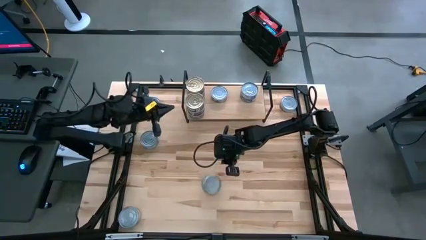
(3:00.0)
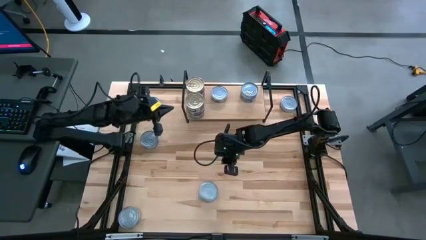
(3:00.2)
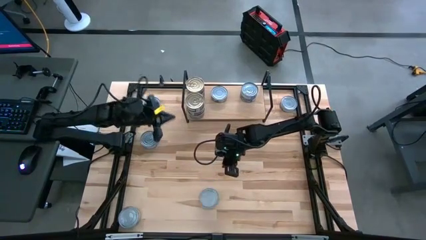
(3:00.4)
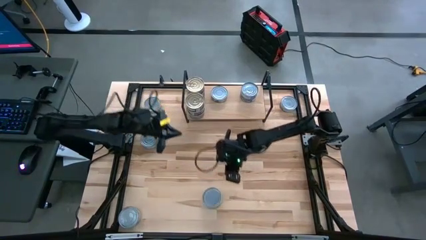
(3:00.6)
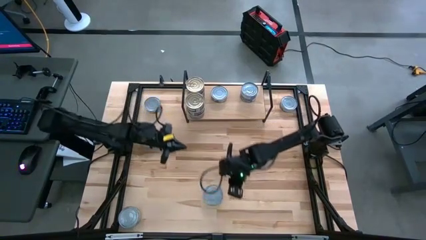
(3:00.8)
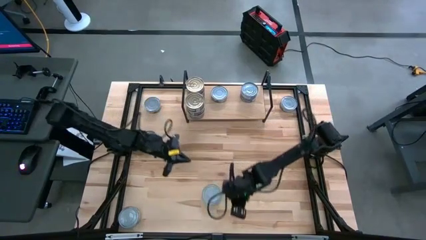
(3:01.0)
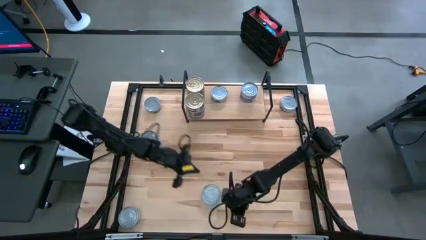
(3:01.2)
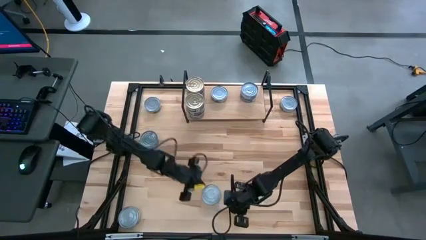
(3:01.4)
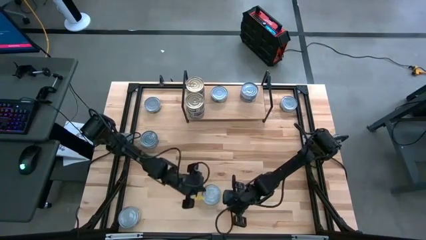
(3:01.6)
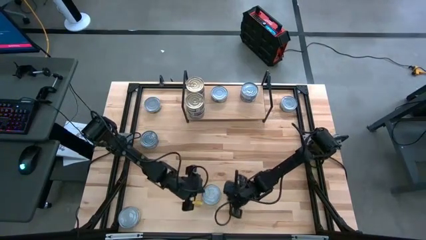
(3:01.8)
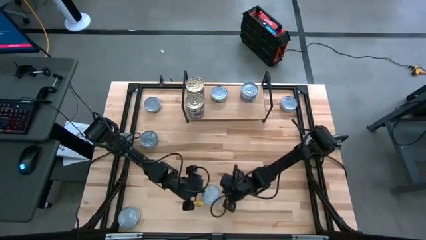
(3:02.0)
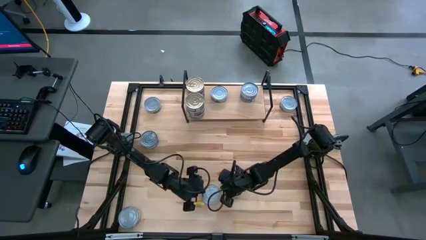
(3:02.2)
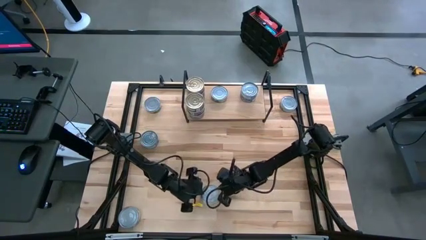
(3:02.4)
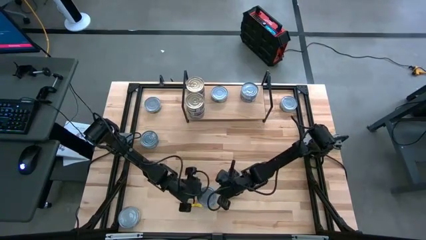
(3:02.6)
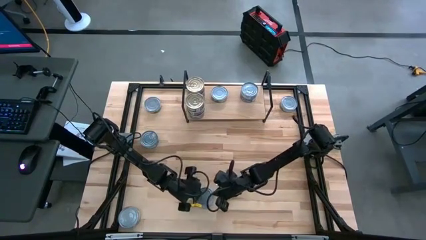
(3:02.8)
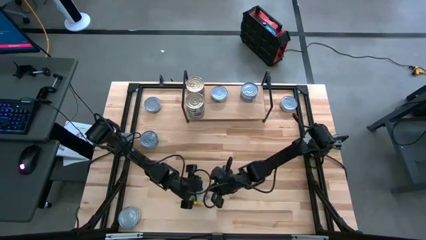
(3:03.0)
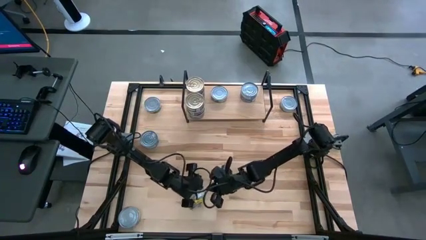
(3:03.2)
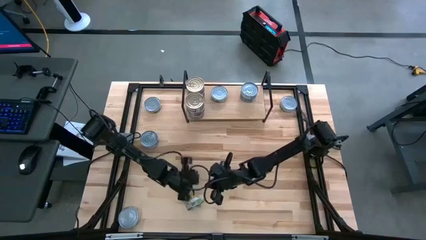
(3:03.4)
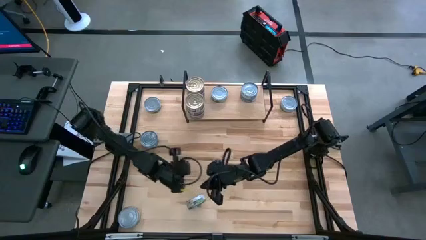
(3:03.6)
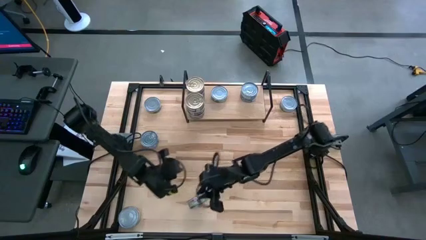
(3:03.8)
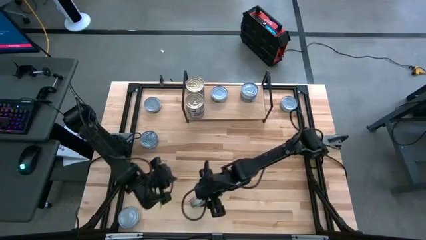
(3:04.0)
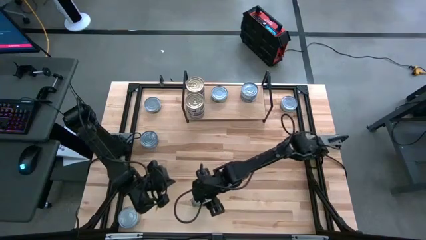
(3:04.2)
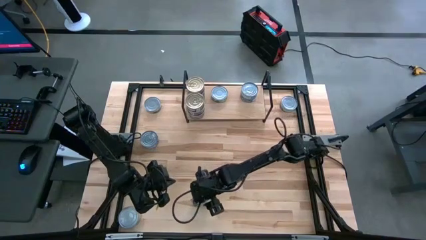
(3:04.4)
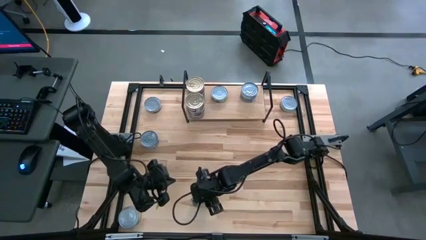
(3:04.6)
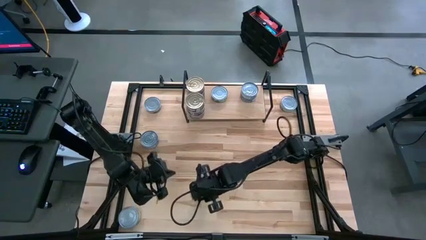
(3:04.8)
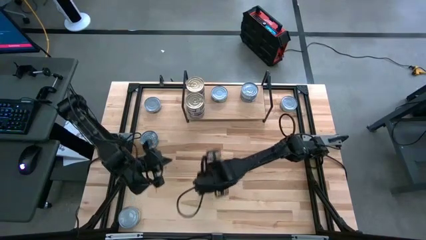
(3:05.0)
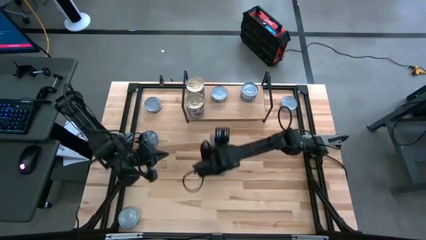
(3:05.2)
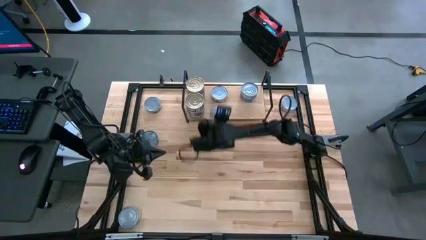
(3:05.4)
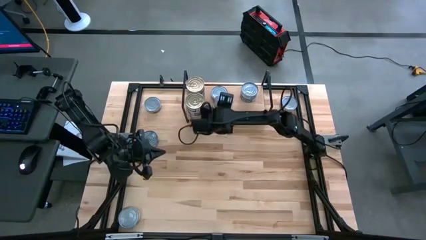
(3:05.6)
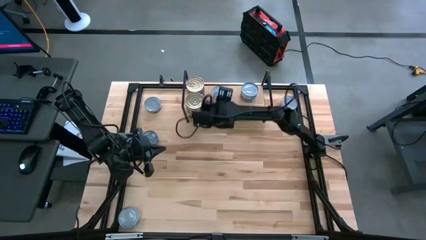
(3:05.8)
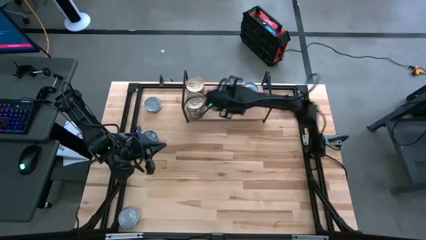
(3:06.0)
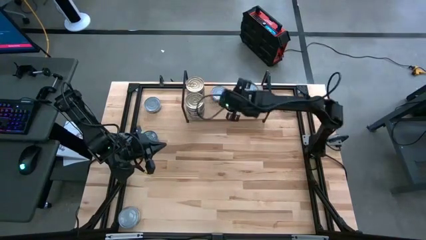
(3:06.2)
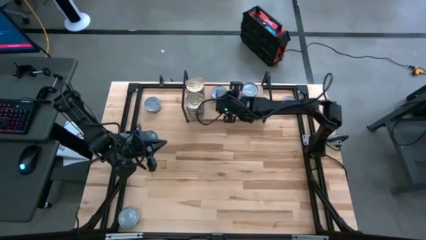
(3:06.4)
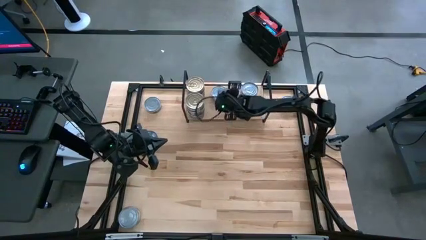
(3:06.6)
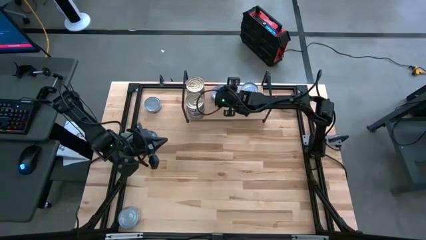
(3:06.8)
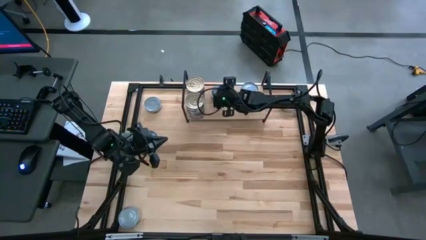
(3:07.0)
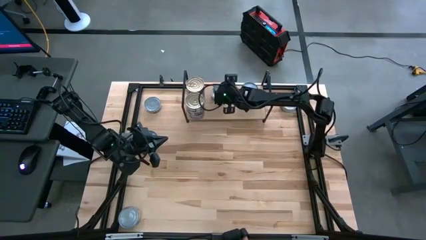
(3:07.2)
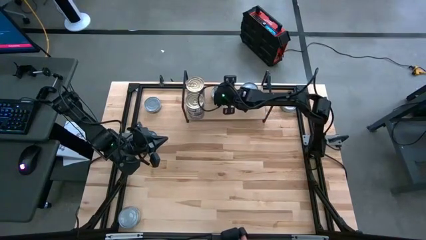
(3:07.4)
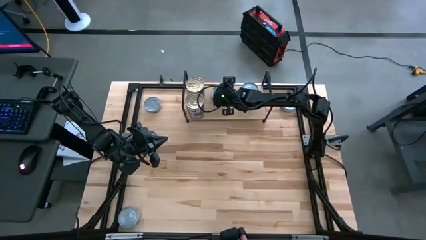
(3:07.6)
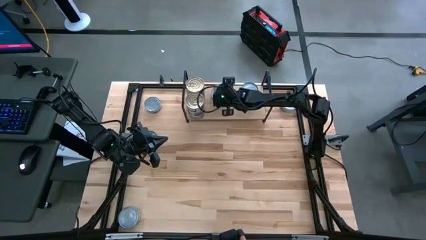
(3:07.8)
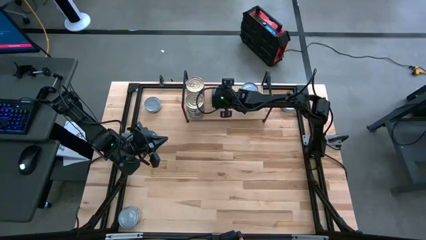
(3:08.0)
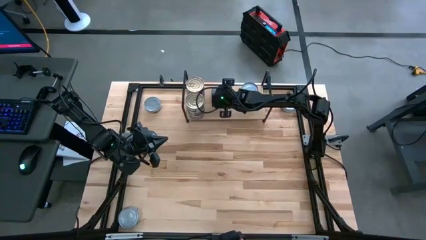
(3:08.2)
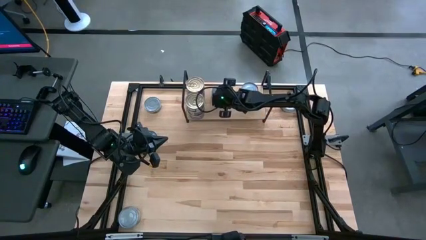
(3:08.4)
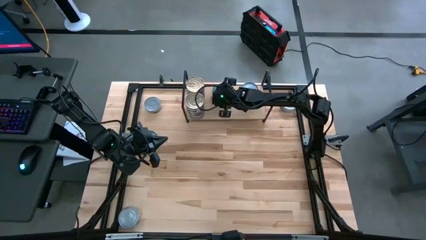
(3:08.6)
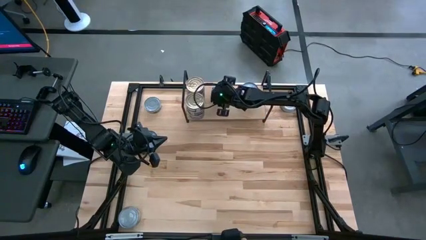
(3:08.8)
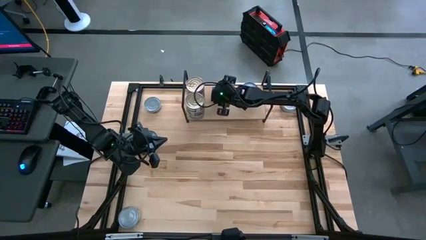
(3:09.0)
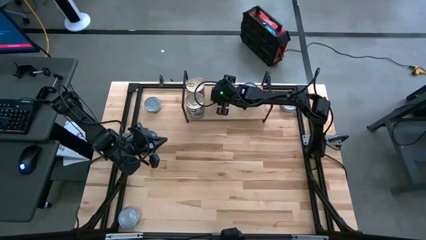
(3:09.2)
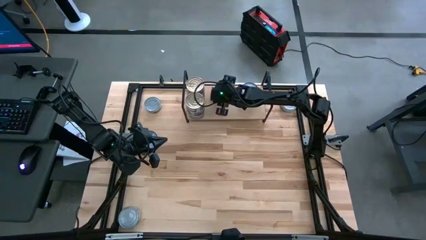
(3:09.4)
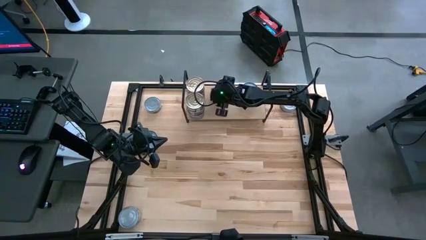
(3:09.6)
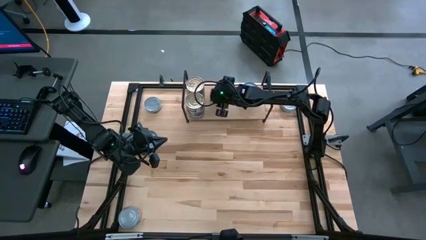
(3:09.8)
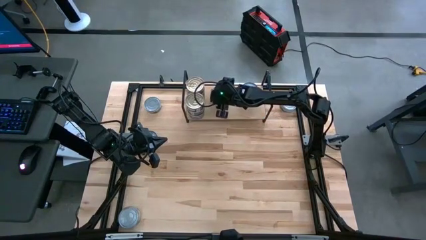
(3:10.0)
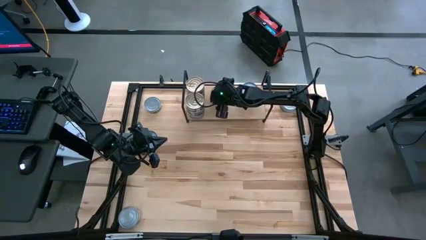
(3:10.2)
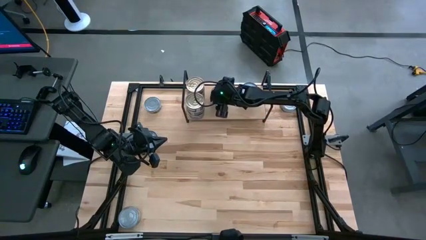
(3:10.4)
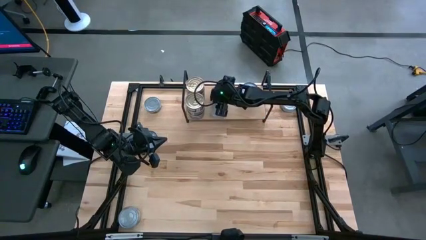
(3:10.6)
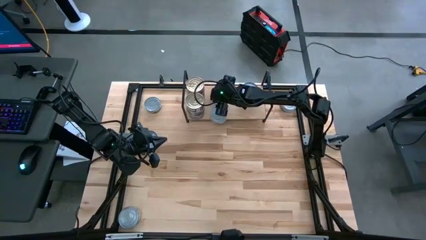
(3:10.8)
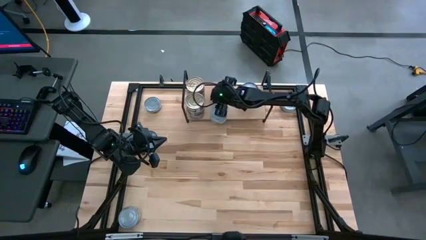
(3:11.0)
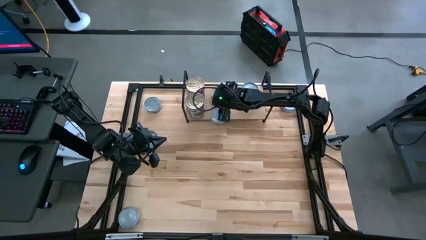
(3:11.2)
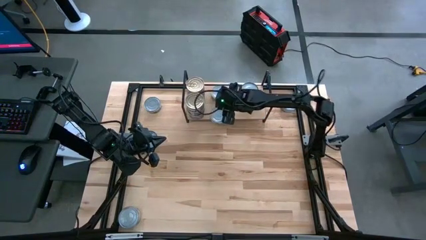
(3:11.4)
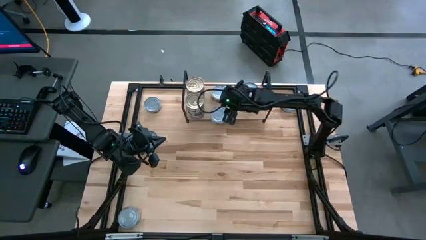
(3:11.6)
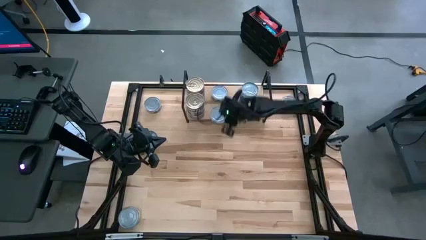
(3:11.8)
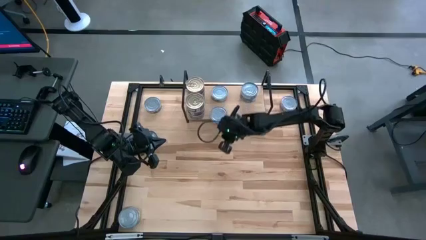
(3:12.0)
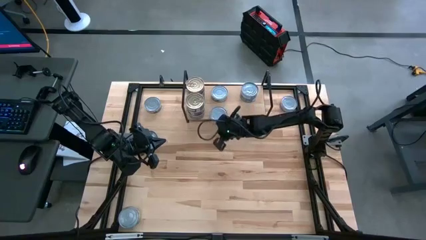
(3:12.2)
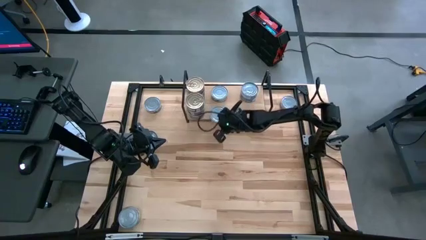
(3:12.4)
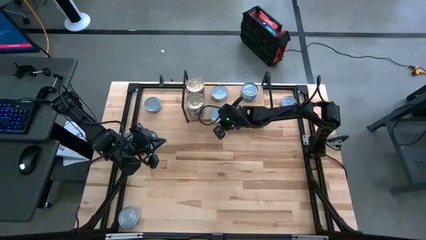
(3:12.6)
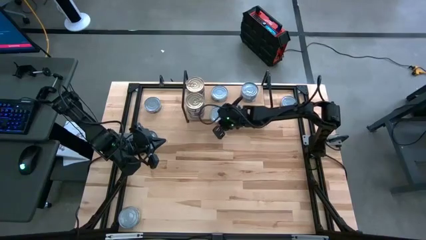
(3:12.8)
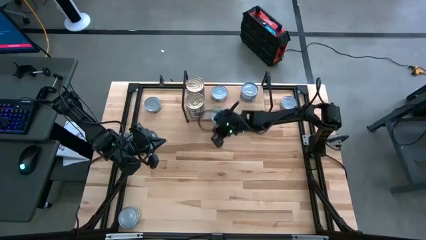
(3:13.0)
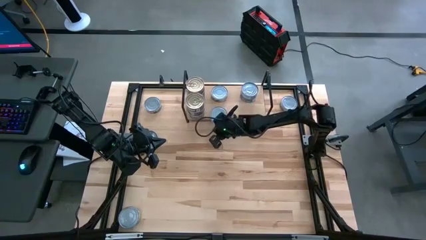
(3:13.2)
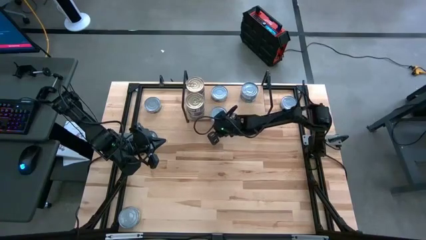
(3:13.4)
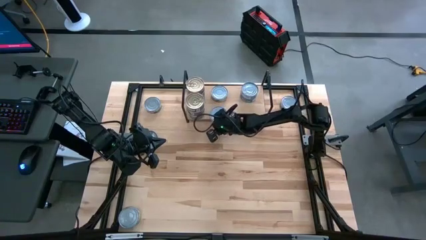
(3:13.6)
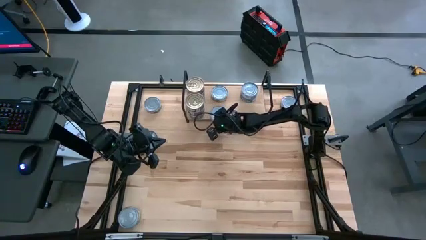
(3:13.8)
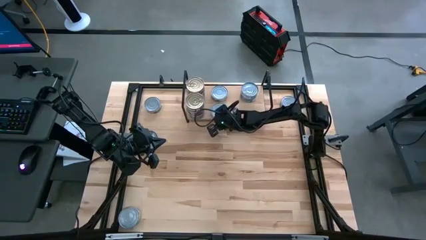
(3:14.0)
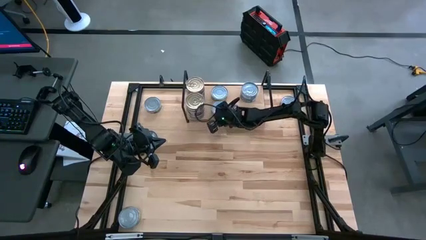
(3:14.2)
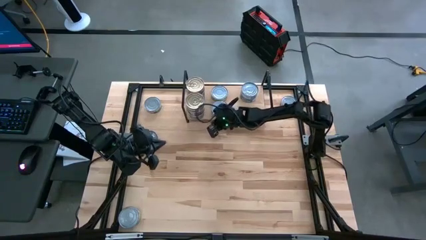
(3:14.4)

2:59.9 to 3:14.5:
Task: Stack canned seafood by type on shelf
Put the green white tuna can on the shelf

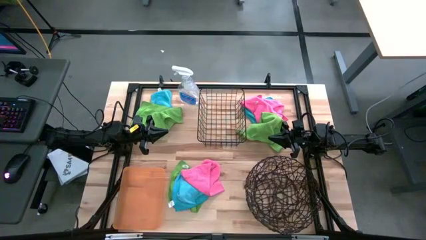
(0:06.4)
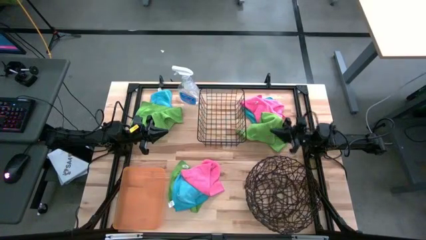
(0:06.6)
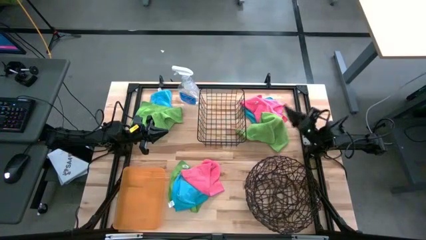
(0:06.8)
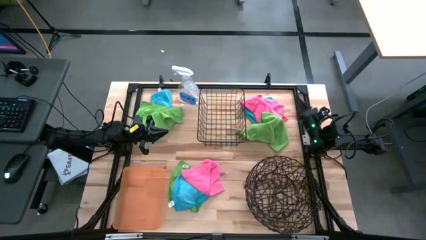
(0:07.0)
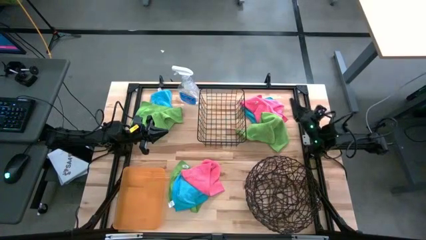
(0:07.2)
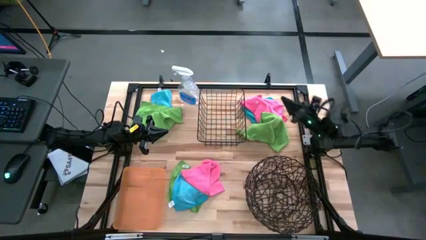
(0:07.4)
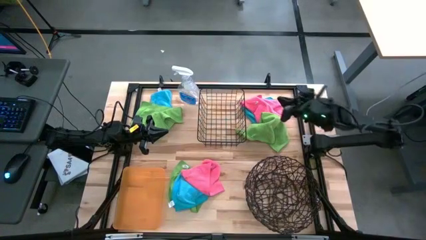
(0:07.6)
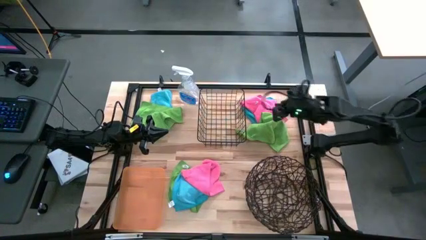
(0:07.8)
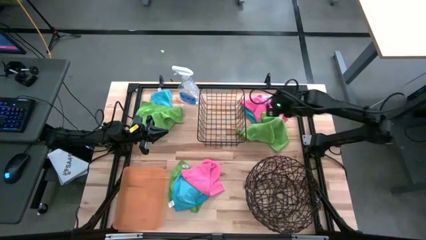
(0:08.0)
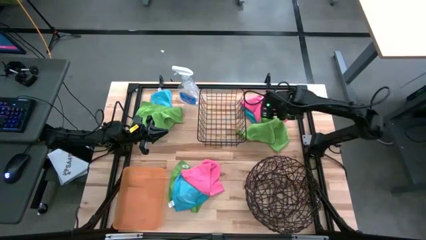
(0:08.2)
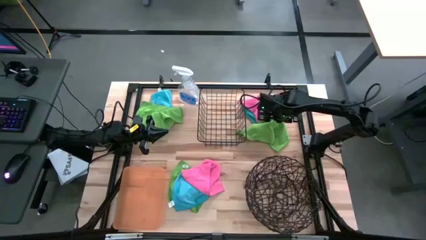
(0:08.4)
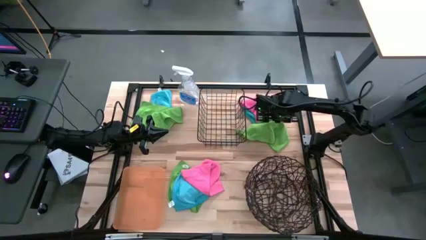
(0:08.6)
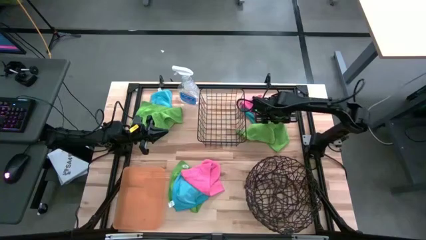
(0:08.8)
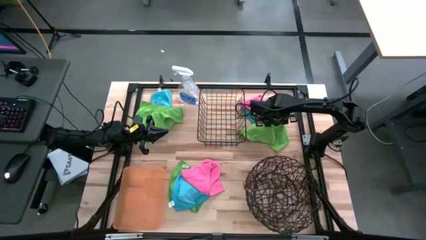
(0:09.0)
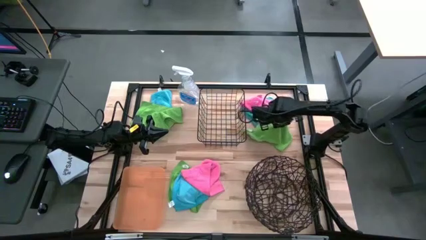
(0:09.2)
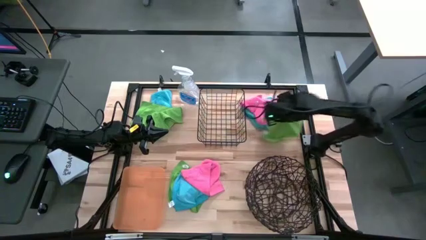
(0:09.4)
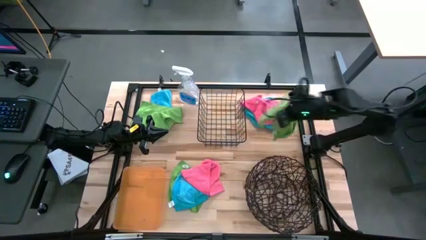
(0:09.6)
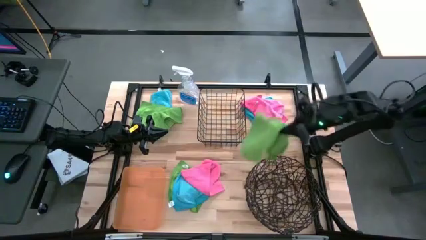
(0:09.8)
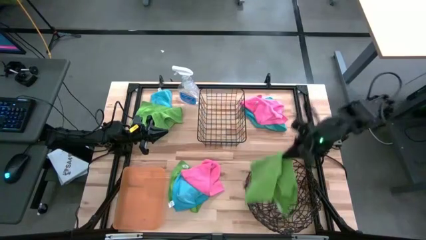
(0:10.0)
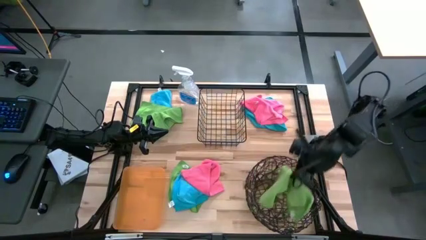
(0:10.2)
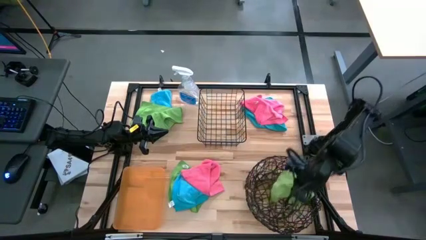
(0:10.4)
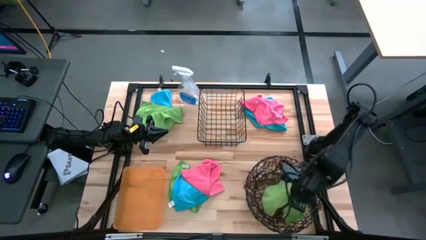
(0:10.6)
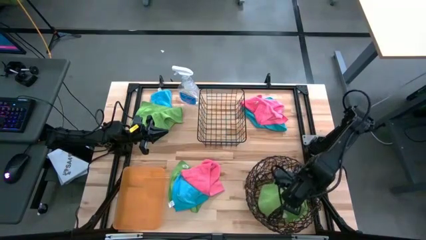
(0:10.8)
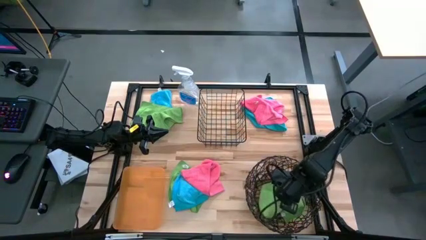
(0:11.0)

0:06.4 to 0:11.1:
Task: Sort microfiber towel by color & place in baskets
Put the top right green towel into the round wire basket
